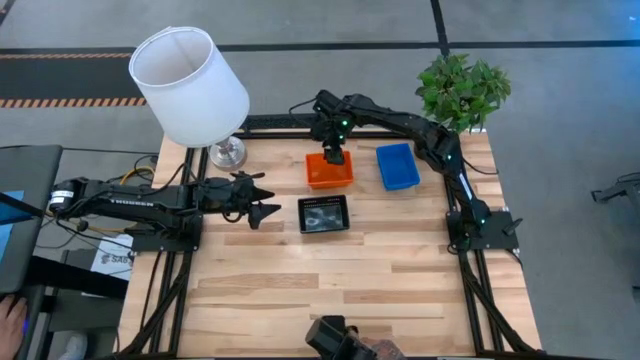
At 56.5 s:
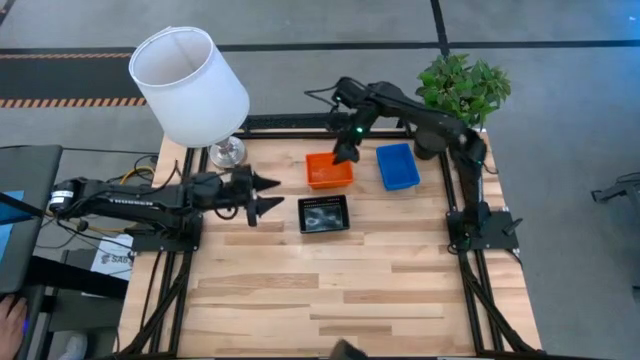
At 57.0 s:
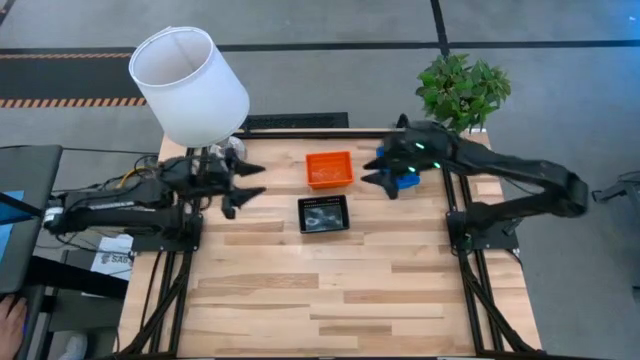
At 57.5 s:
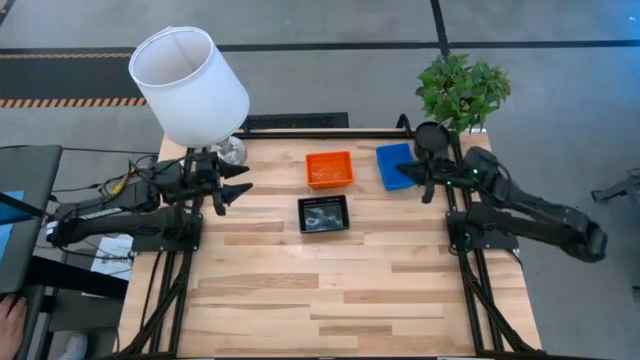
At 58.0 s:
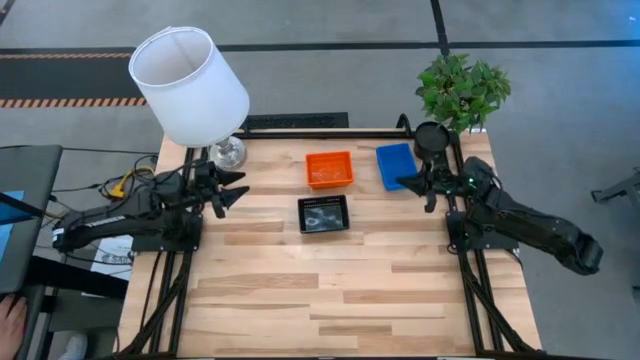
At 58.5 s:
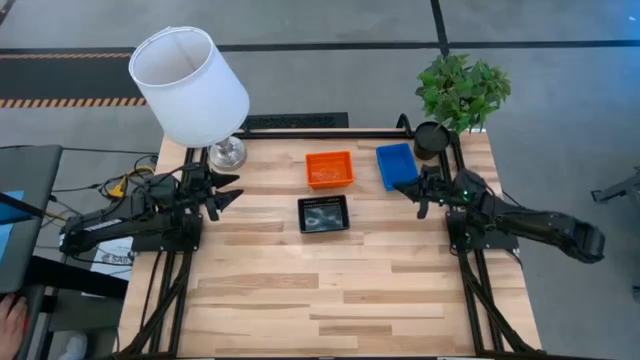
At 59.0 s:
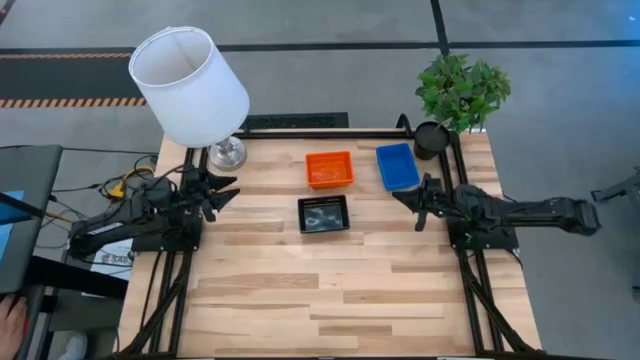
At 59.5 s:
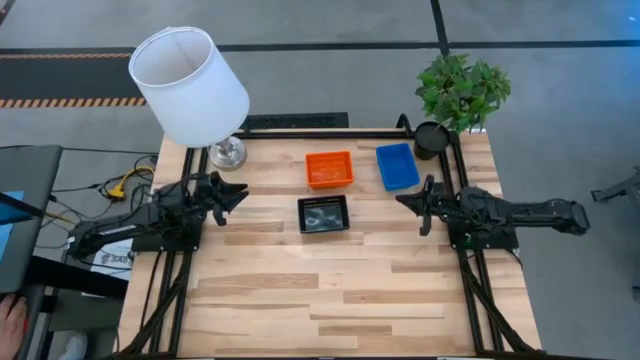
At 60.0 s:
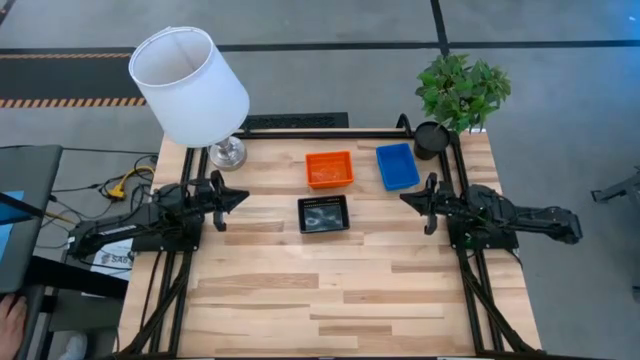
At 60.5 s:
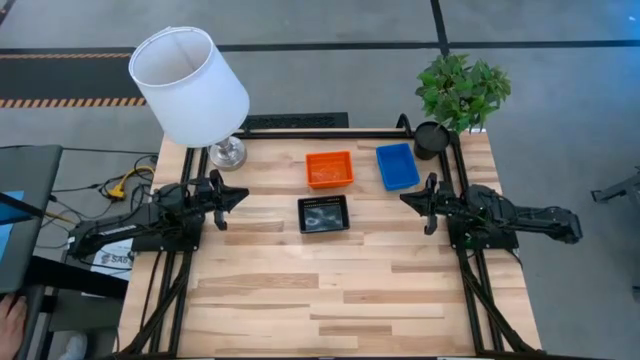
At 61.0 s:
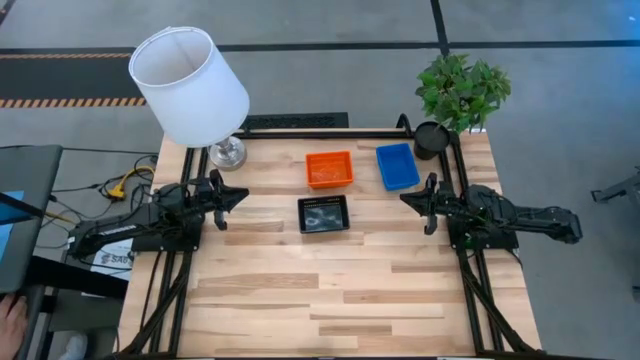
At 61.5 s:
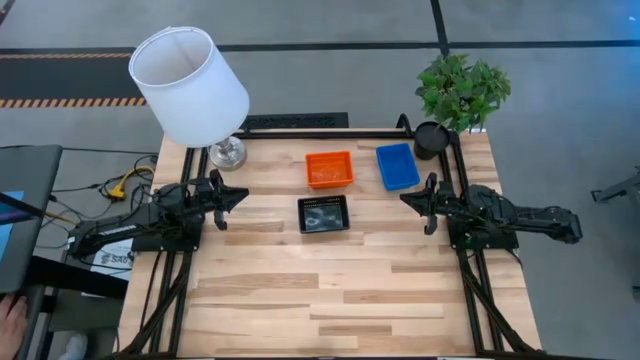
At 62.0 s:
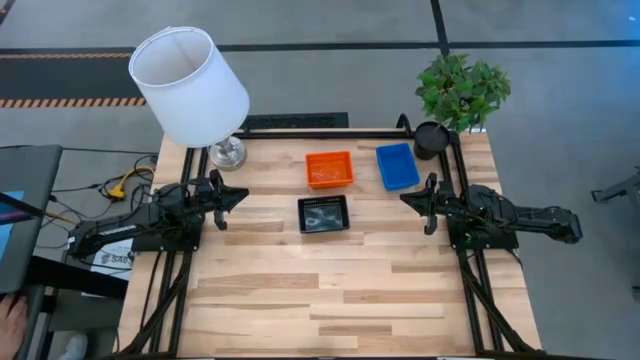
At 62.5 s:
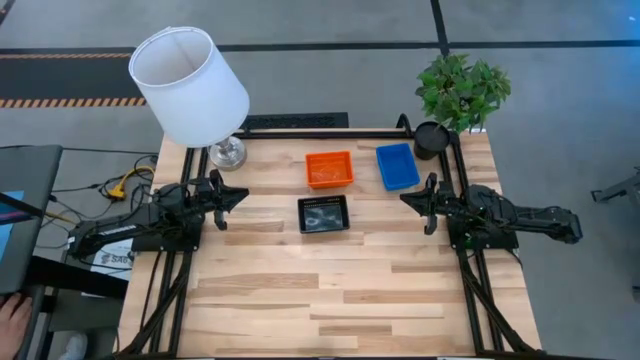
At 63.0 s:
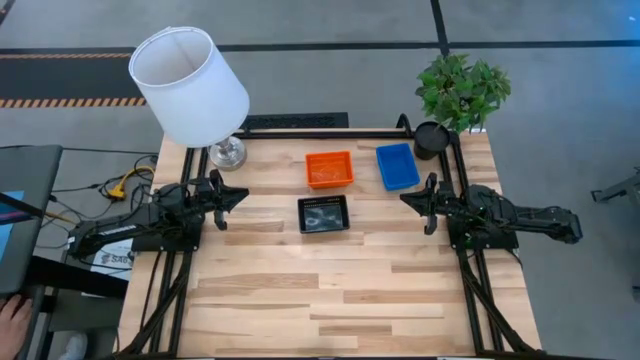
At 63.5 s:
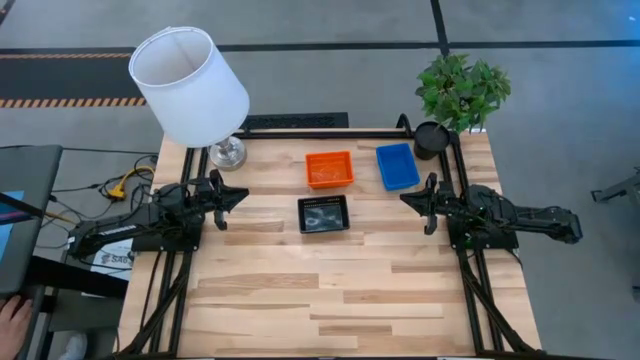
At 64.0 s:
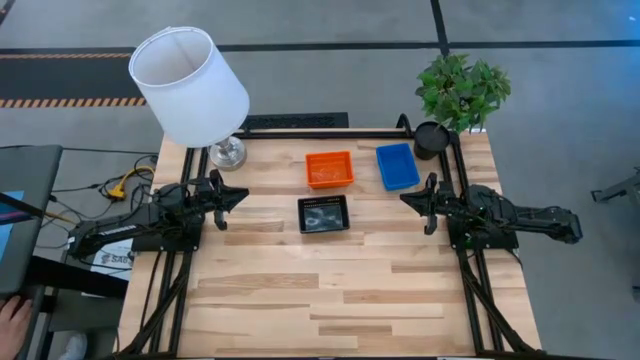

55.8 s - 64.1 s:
Return to Home Position

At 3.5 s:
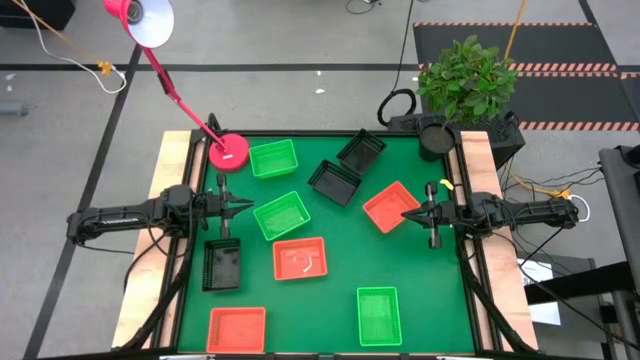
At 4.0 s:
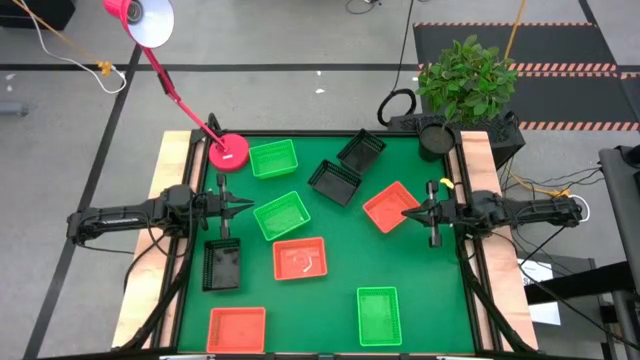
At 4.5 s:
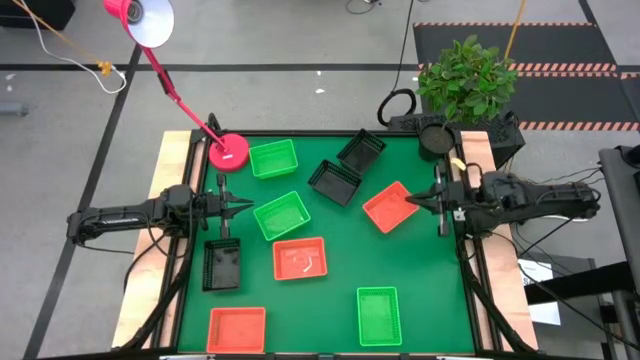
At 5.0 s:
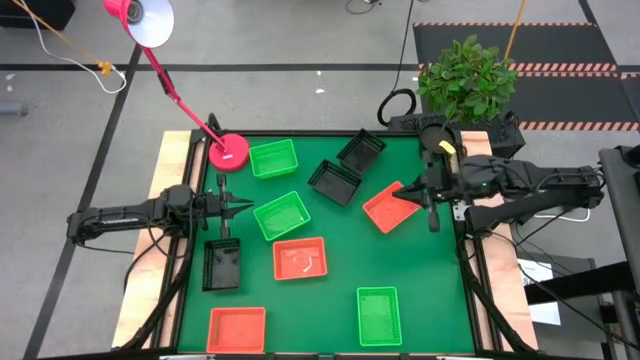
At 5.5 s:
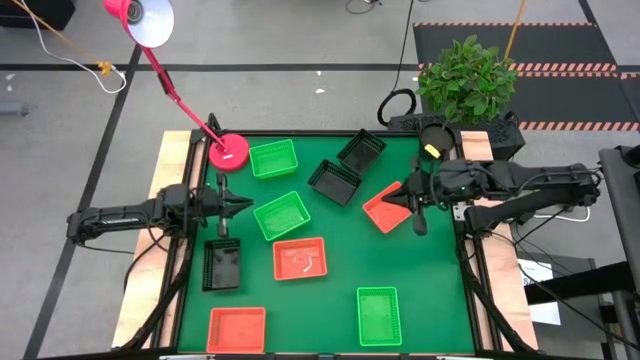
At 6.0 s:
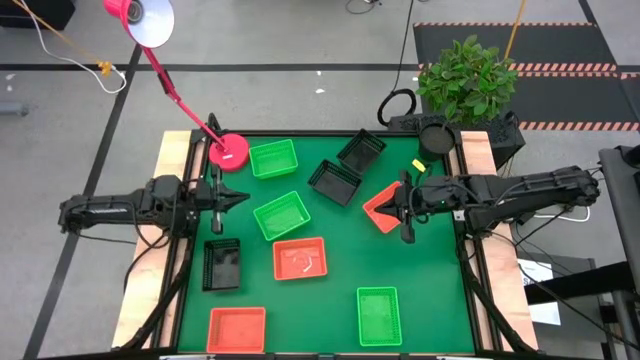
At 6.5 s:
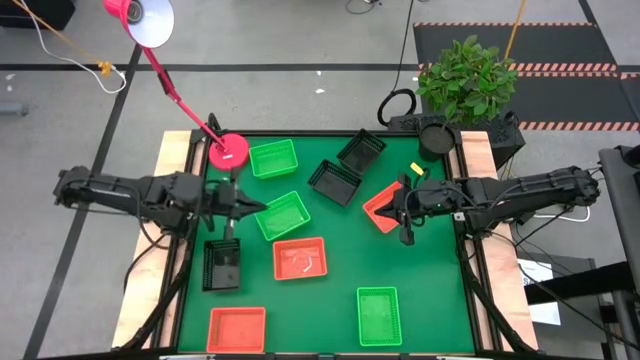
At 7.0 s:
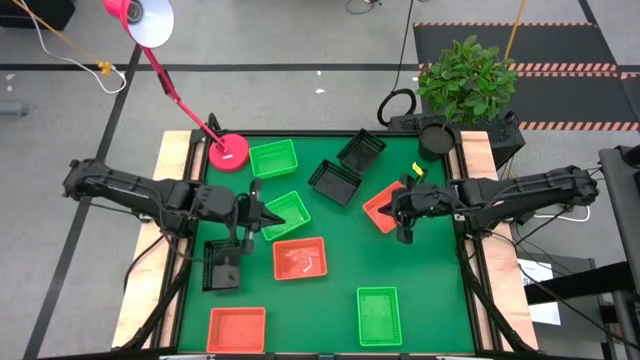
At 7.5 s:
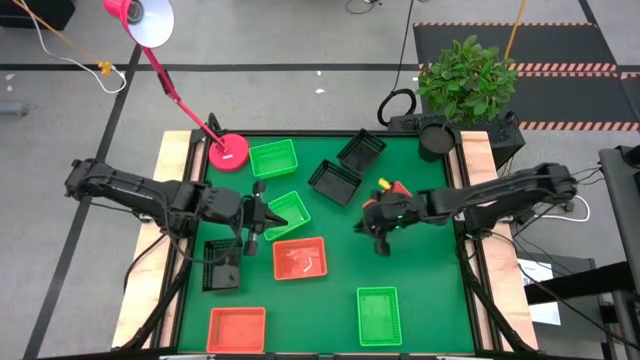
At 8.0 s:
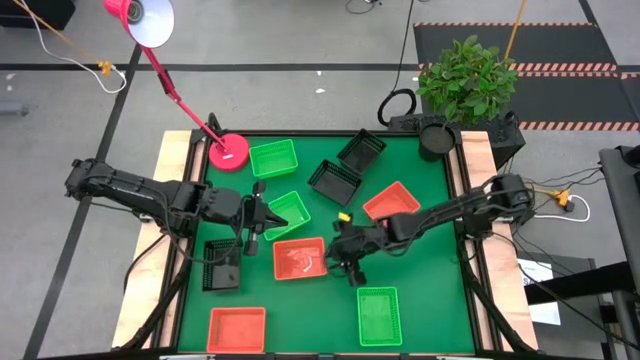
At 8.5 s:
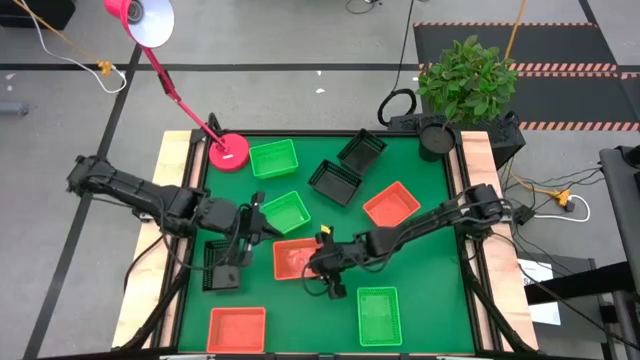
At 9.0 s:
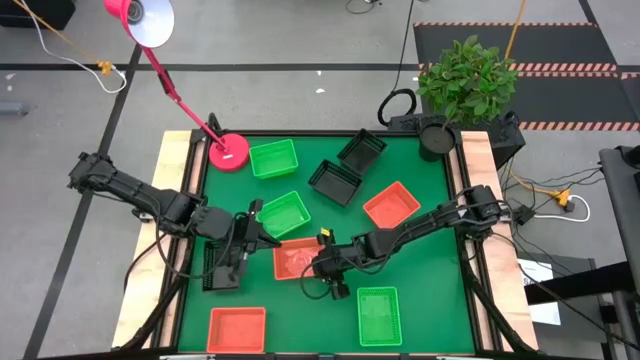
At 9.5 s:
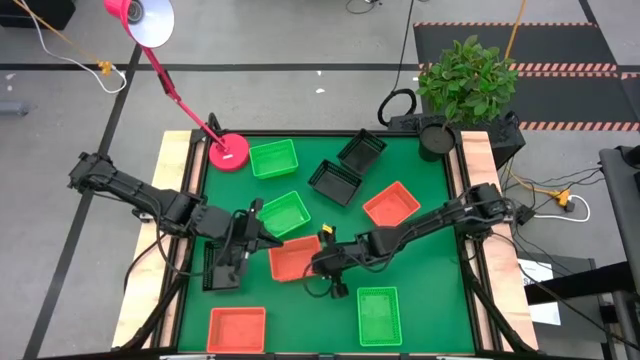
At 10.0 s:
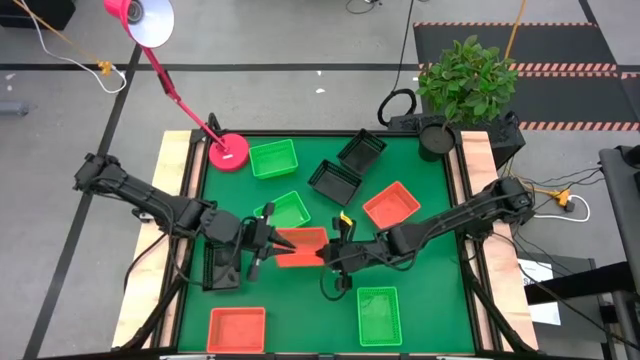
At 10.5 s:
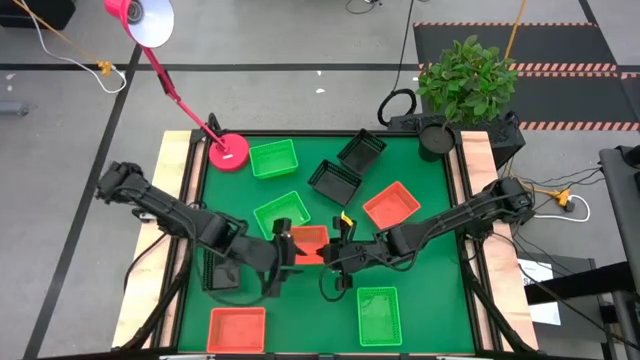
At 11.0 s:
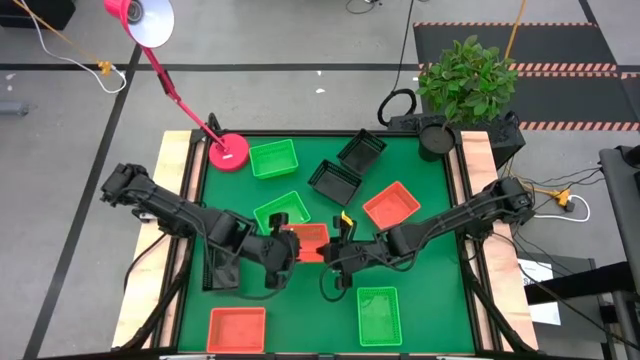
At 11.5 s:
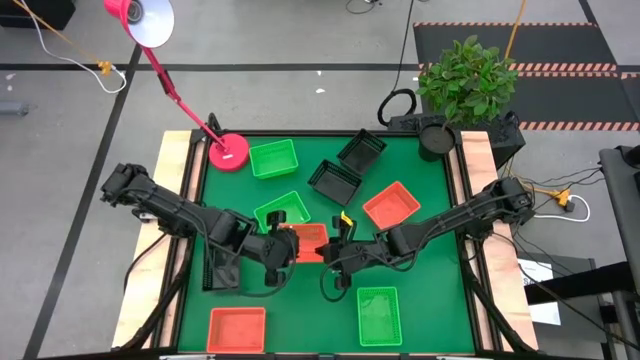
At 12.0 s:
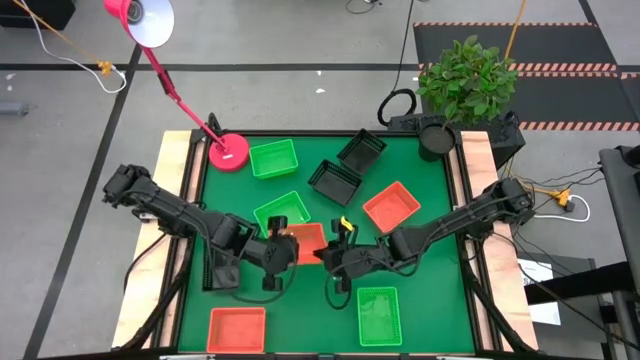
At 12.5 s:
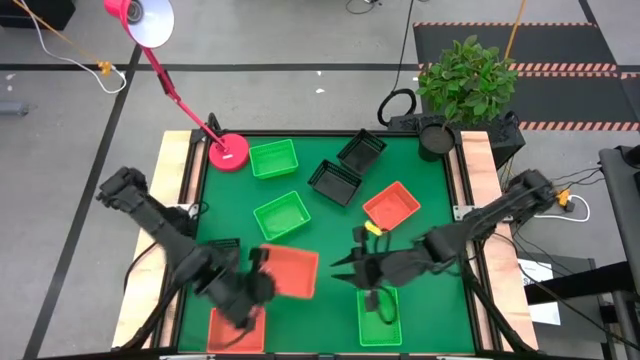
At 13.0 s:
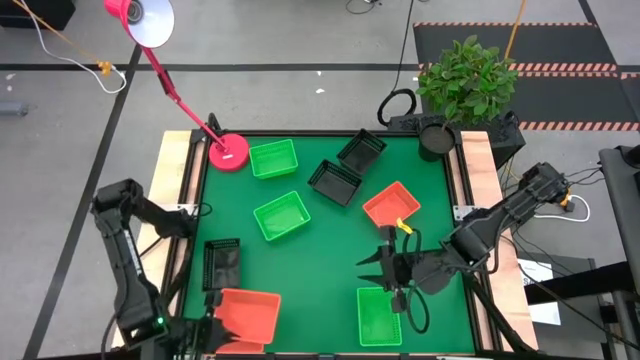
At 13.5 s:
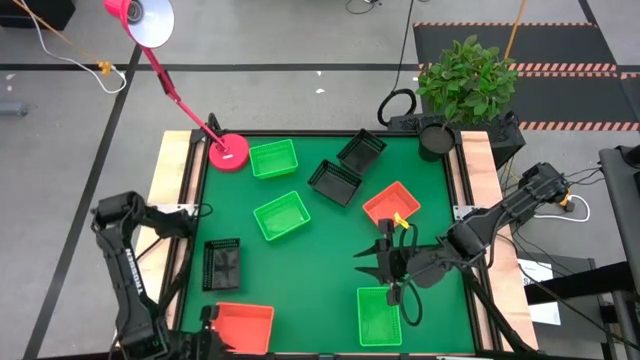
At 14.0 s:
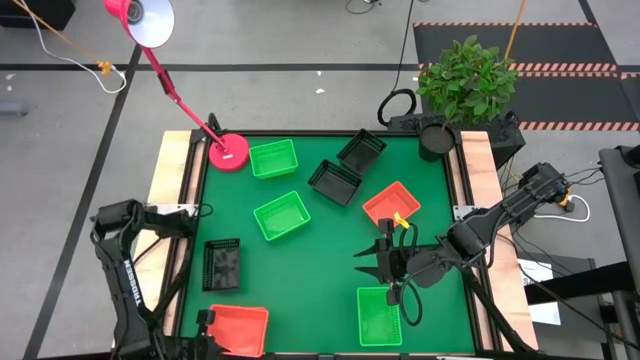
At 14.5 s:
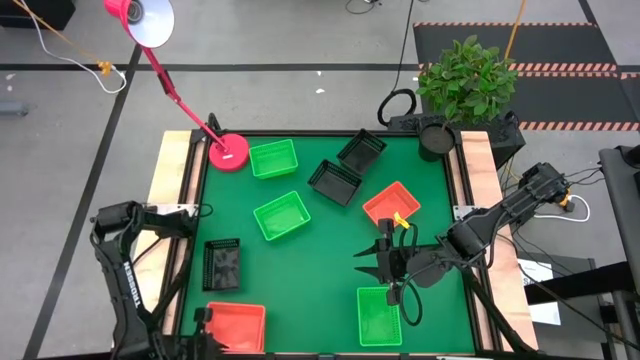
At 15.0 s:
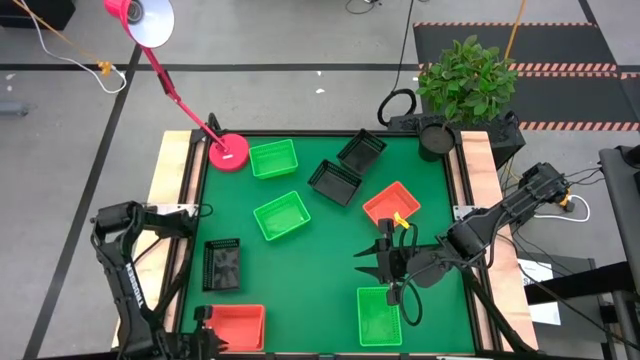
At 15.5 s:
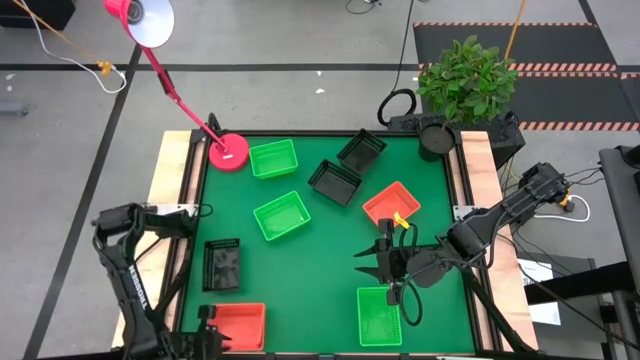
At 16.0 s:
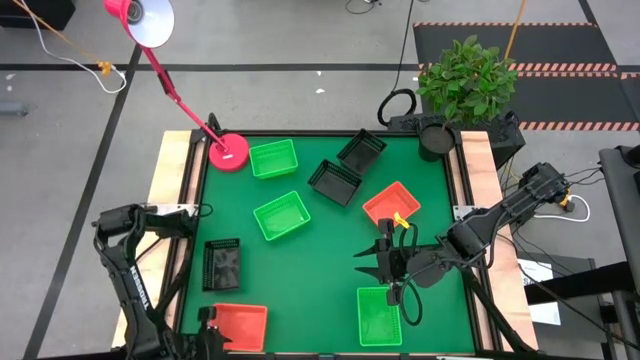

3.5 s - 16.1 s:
Stack the middle orange bin on the bottom orange bin
